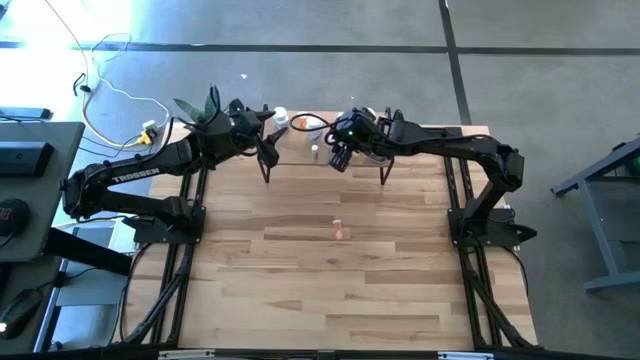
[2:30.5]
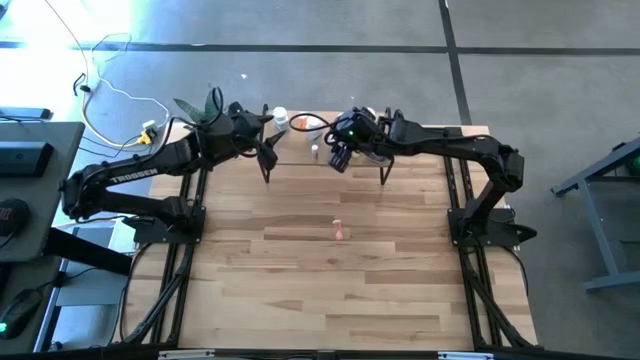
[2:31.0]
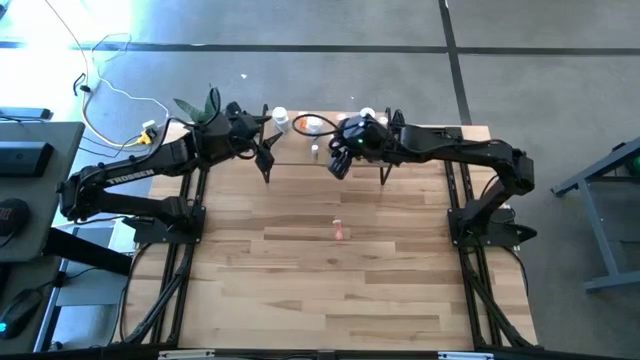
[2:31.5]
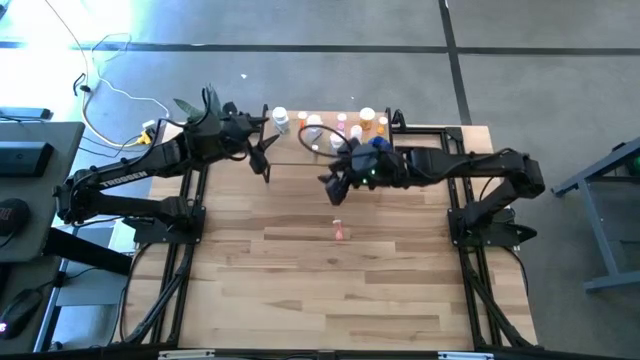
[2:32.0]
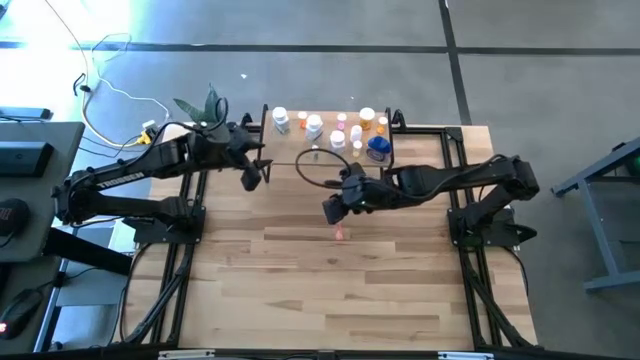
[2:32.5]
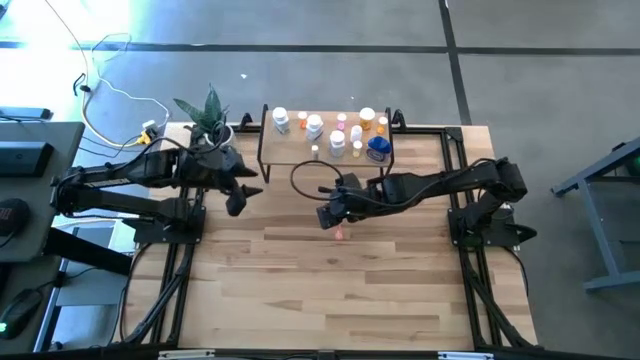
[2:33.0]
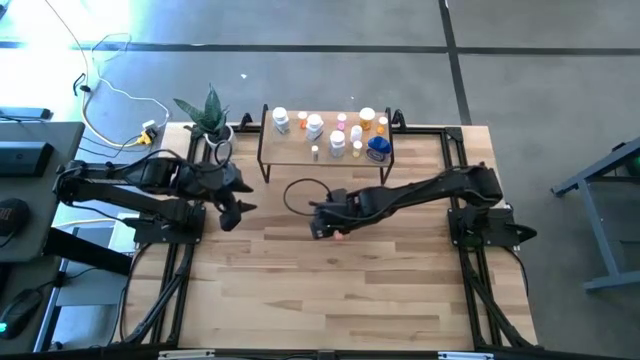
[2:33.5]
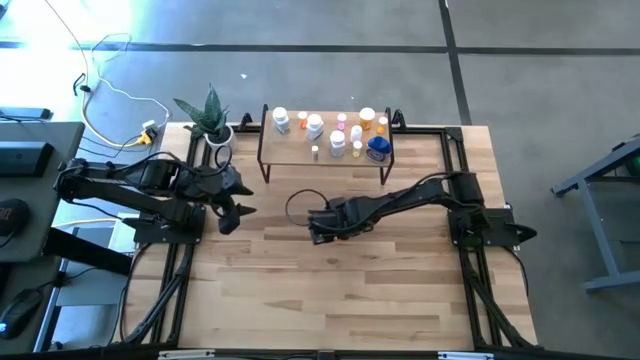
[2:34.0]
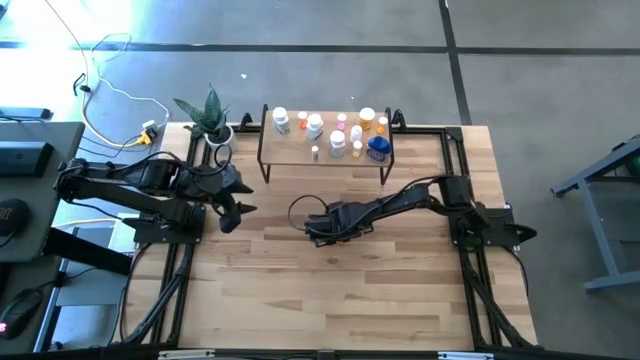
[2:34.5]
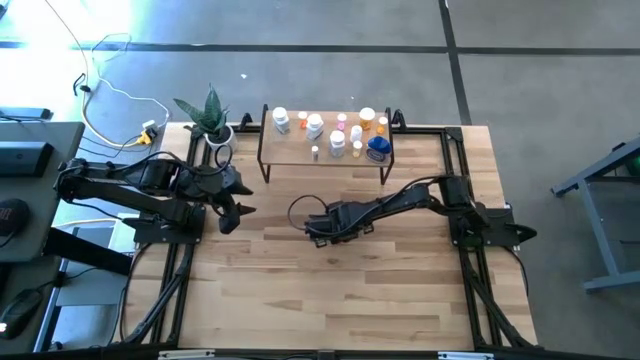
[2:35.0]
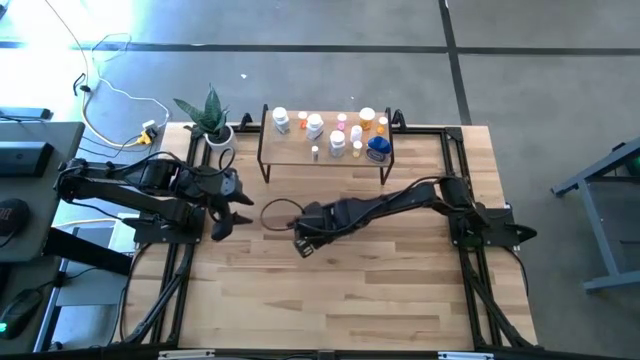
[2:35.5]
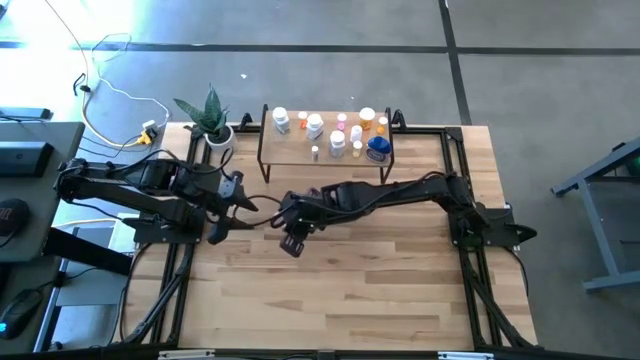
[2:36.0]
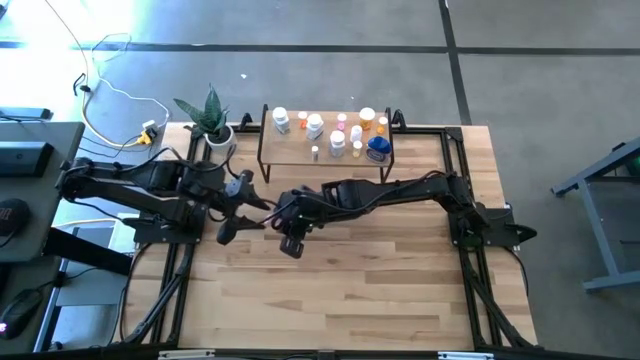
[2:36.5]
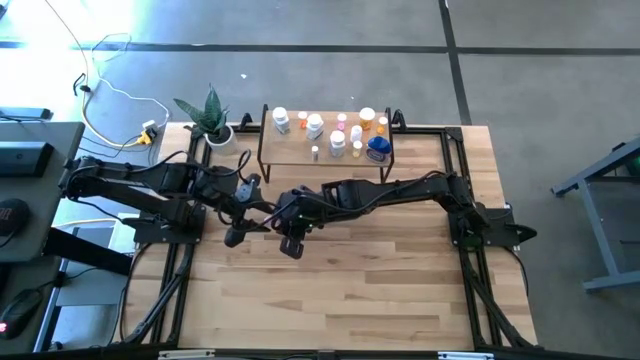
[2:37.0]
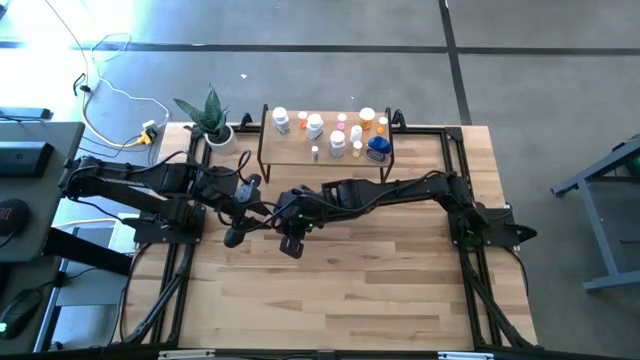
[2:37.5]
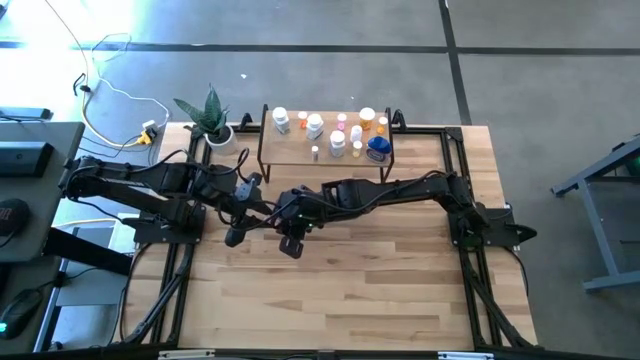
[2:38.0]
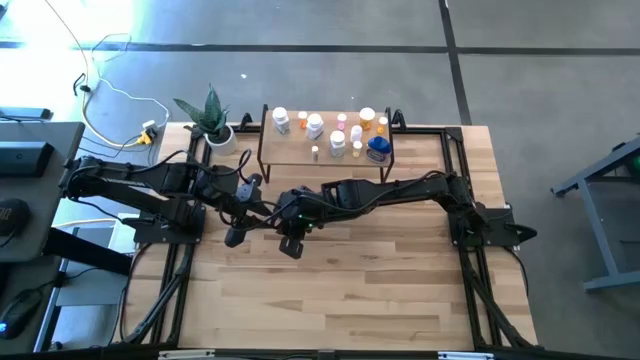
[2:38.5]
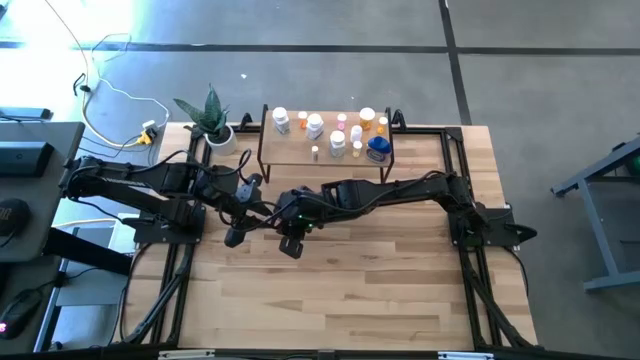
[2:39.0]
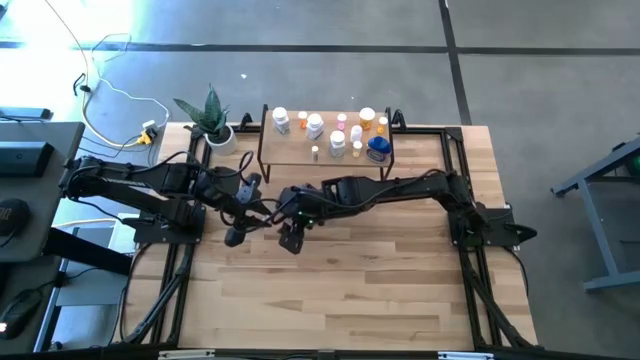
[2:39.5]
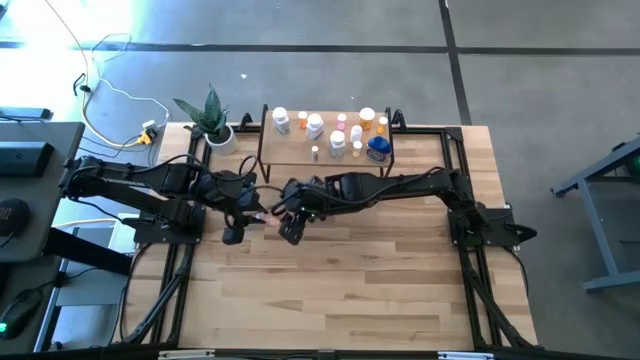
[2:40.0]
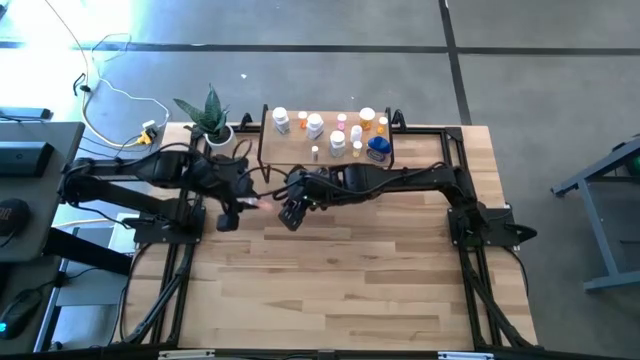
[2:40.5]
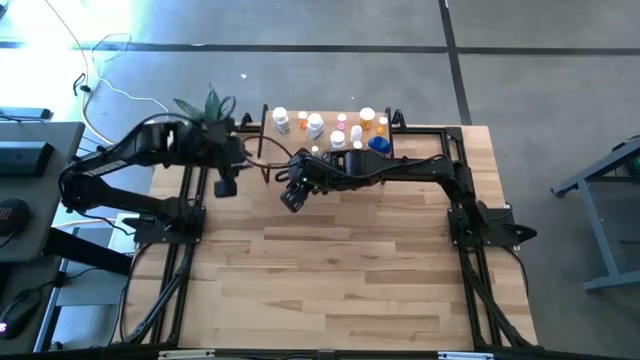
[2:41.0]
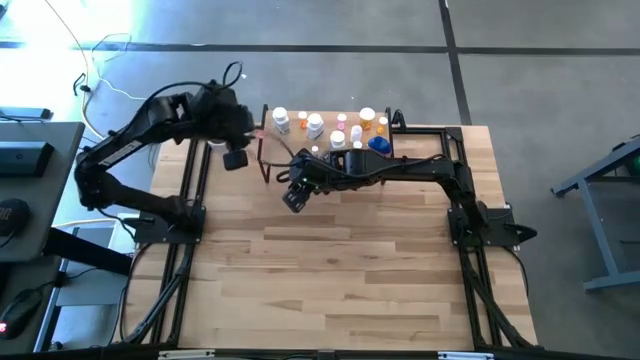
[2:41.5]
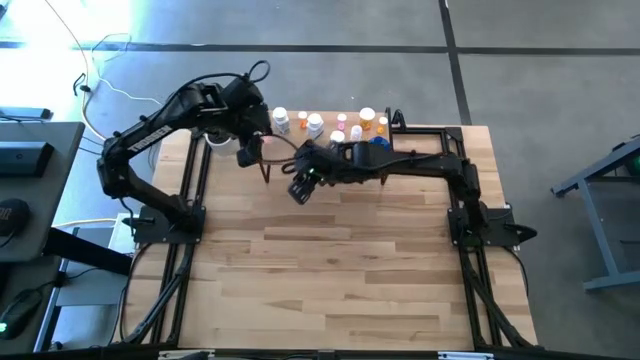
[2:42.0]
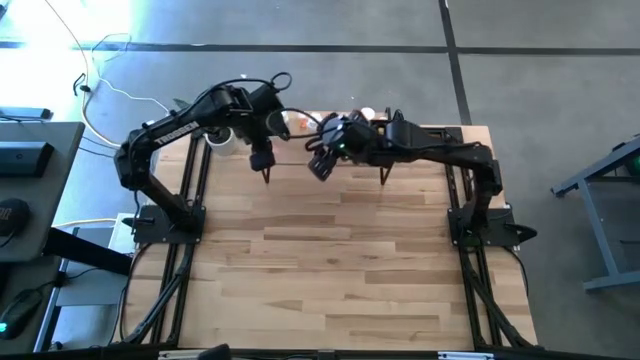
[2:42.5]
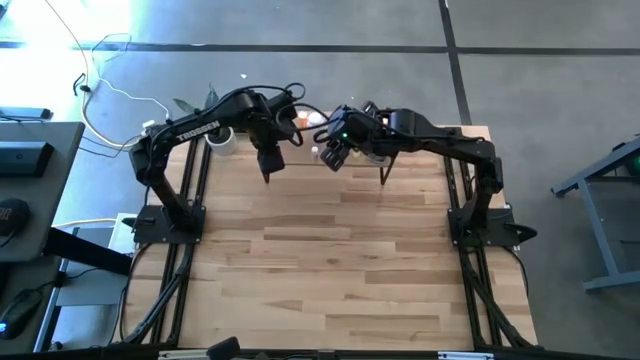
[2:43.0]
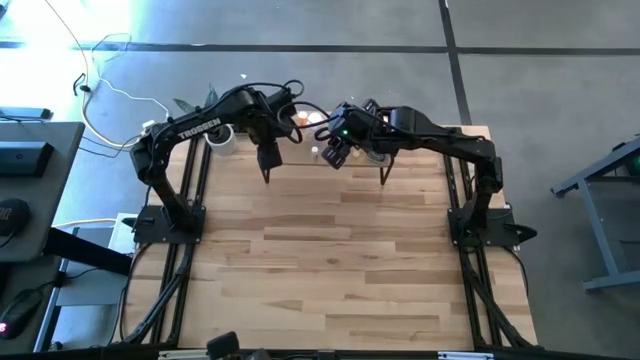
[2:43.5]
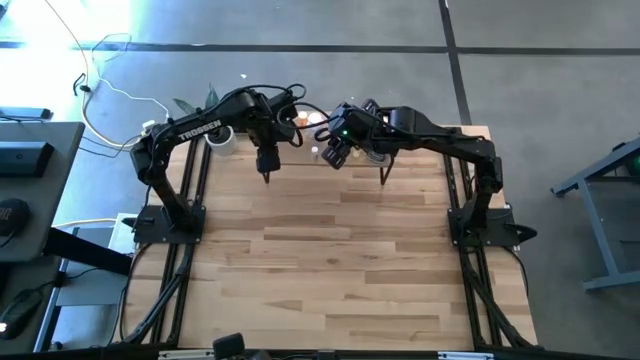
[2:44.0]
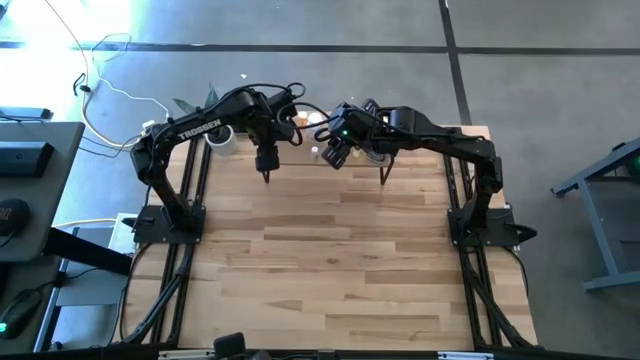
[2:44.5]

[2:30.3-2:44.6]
Task: Pick and place medicine bottles onto shelf by color
Put the pink pill bottle on the shelf

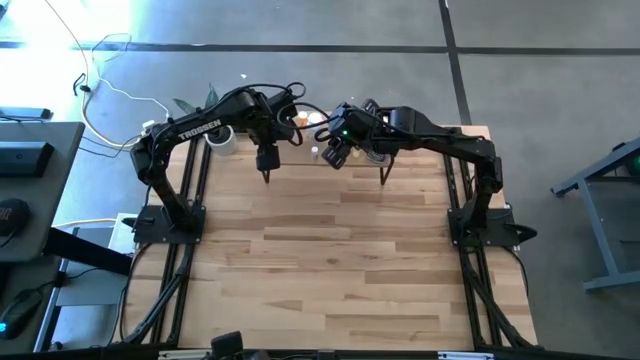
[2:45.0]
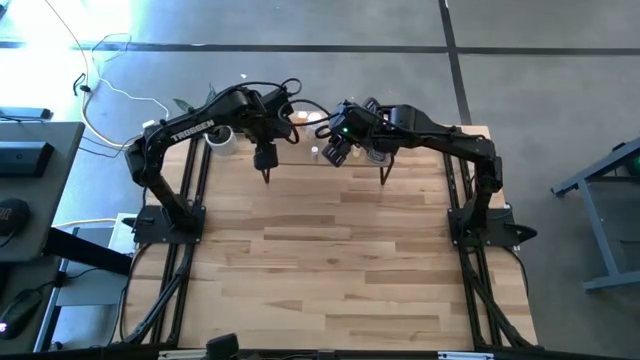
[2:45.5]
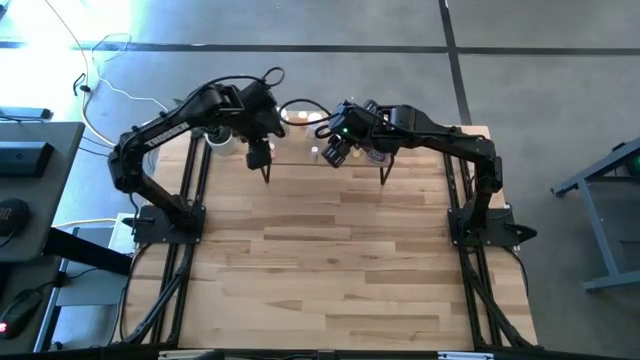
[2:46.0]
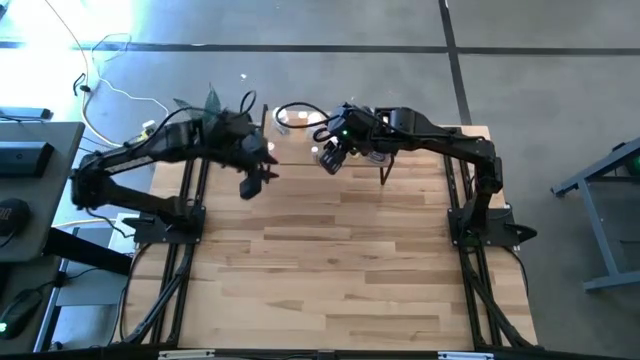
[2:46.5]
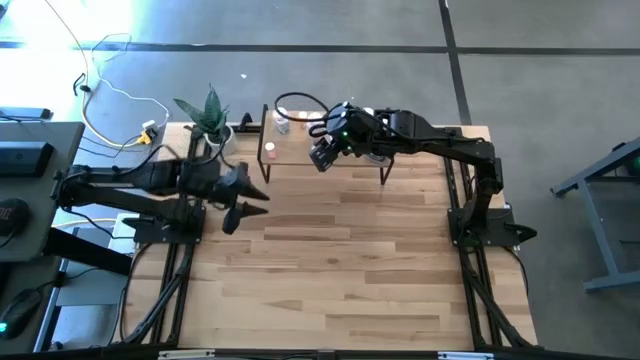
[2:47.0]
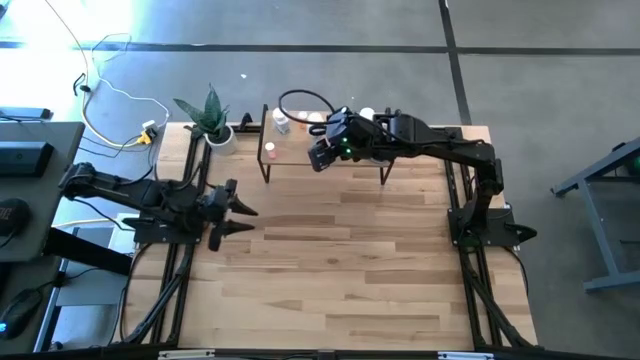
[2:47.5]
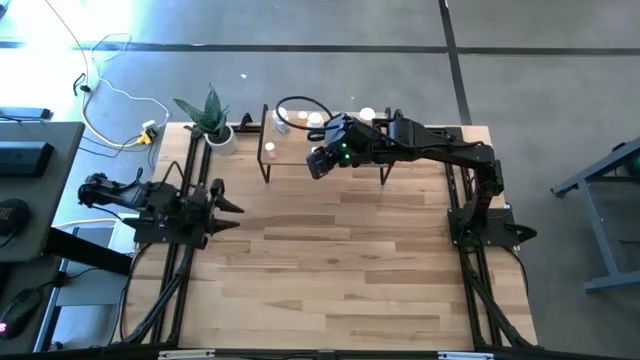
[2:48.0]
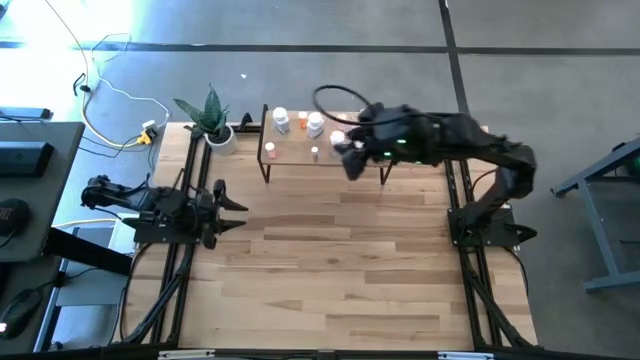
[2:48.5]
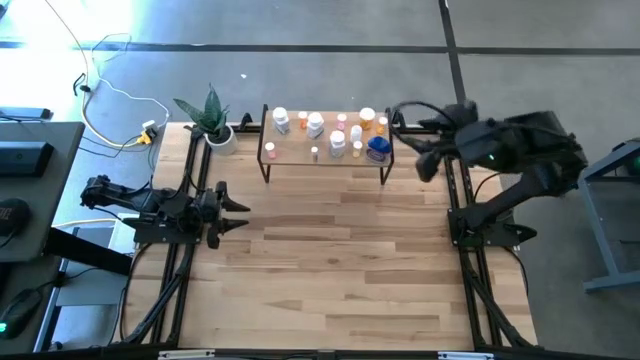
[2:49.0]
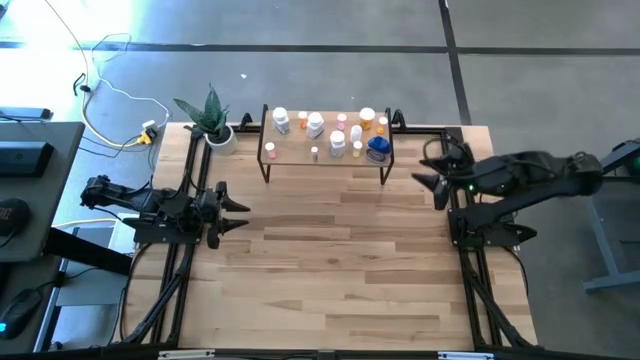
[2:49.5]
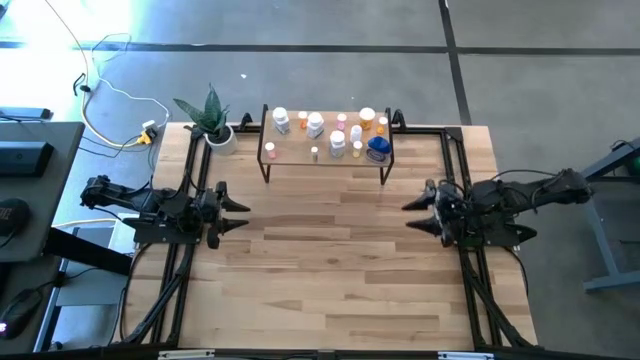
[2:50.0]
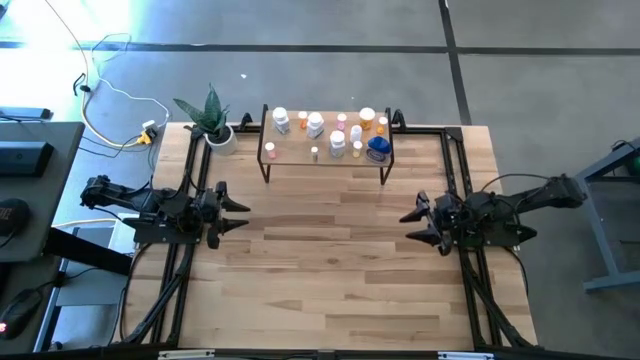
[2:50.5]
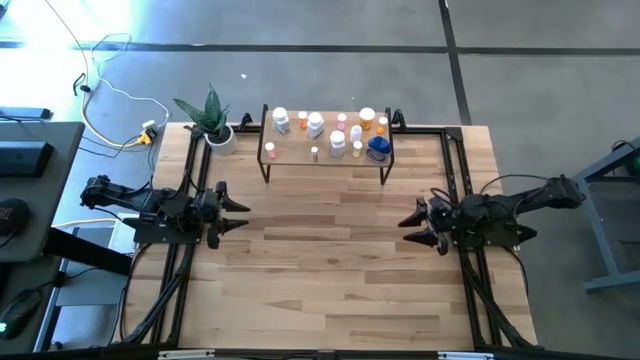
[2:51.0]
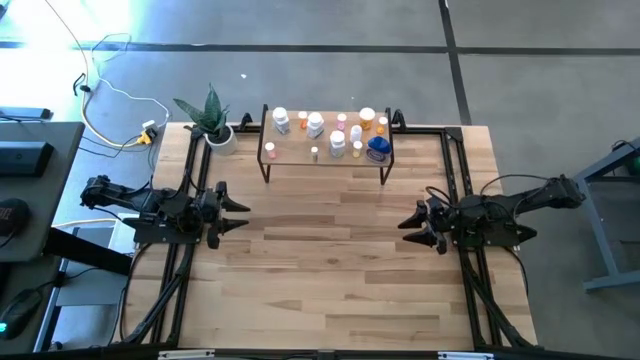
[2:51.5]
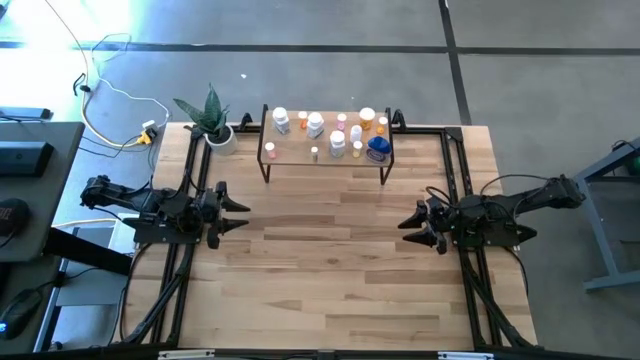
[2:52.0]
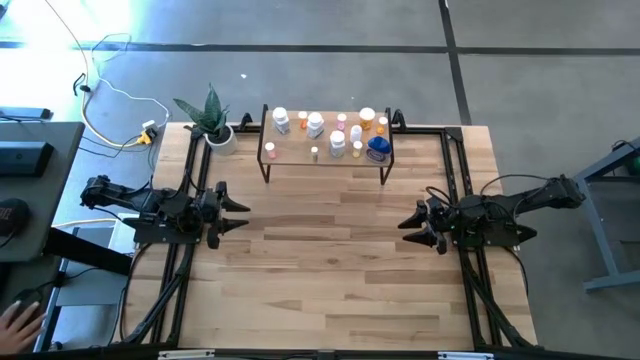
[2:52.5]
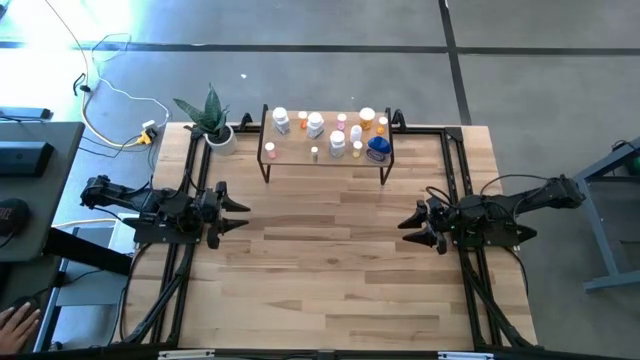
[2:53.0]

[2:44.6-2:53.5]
Return to Home Position
